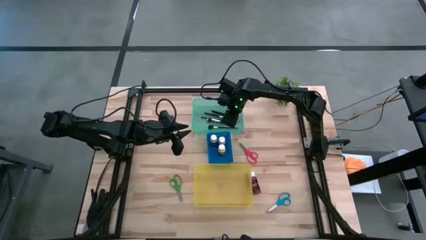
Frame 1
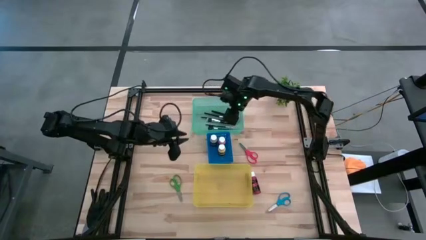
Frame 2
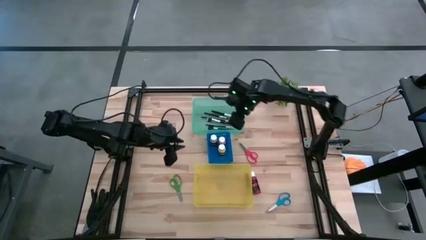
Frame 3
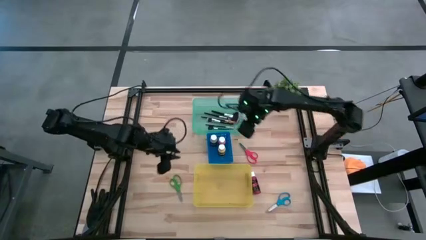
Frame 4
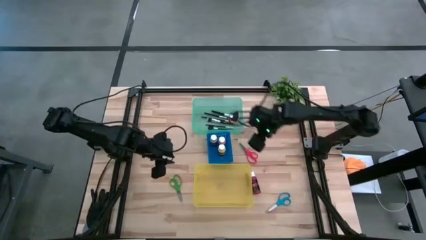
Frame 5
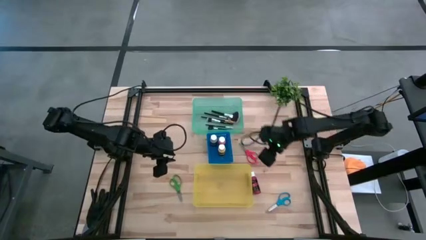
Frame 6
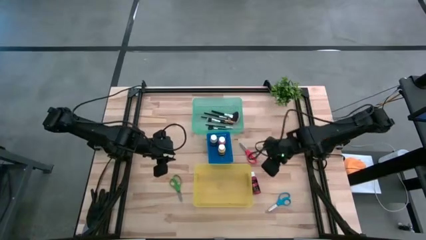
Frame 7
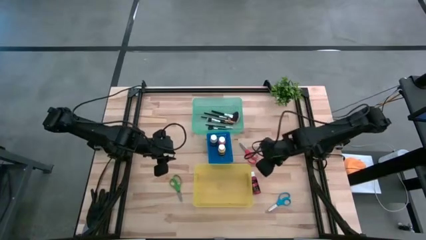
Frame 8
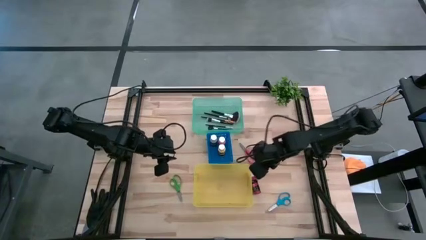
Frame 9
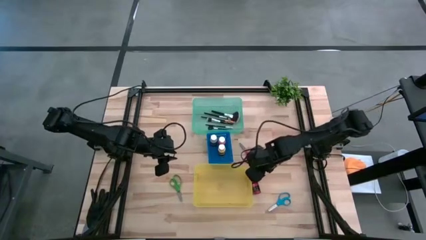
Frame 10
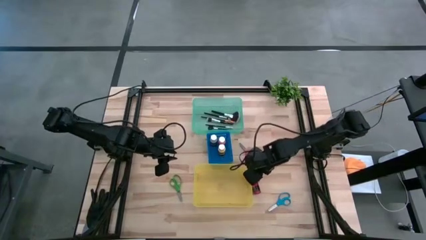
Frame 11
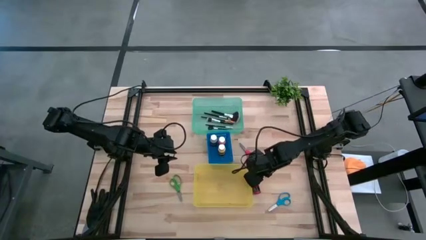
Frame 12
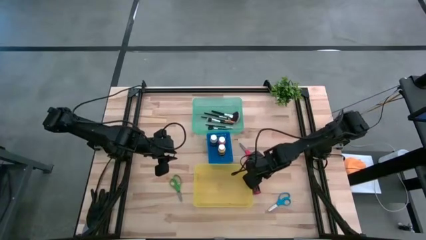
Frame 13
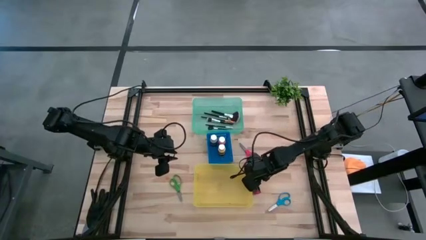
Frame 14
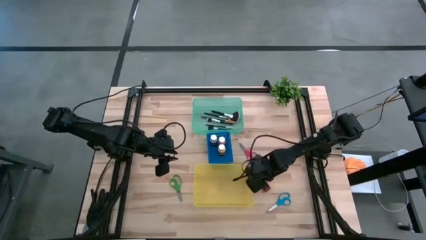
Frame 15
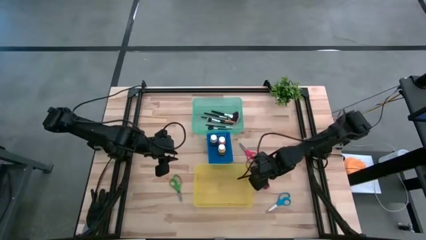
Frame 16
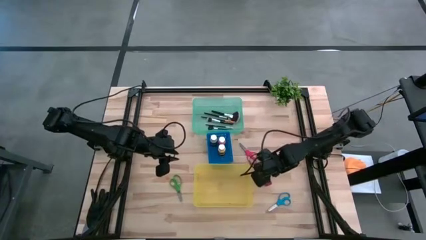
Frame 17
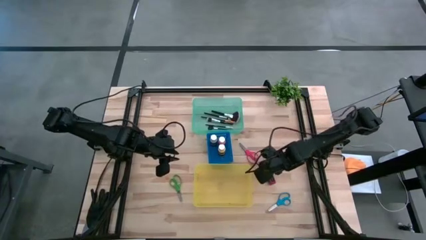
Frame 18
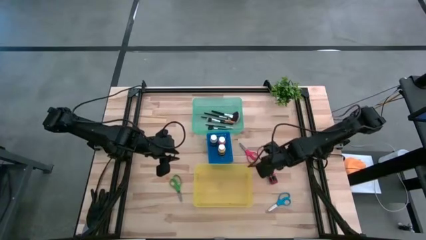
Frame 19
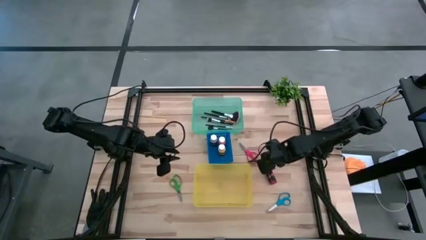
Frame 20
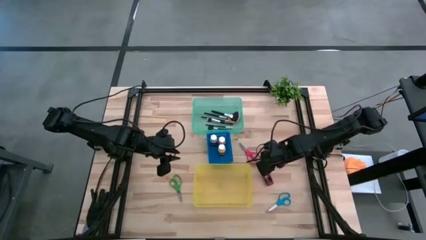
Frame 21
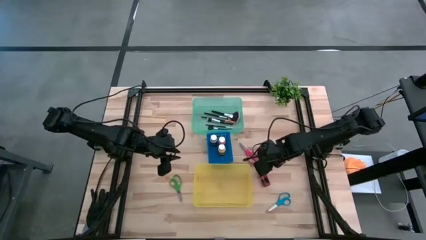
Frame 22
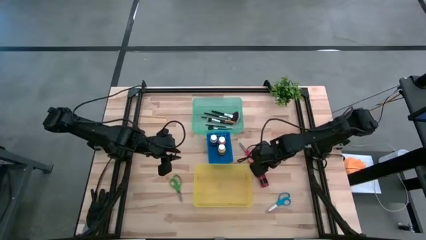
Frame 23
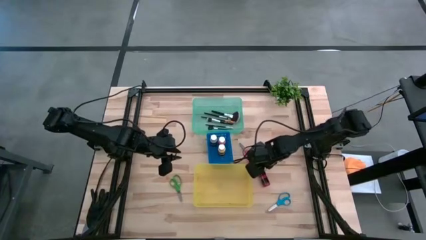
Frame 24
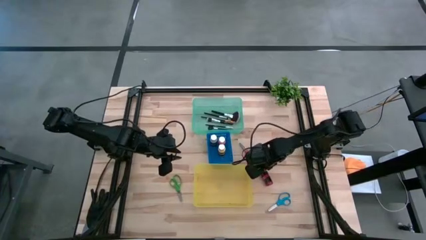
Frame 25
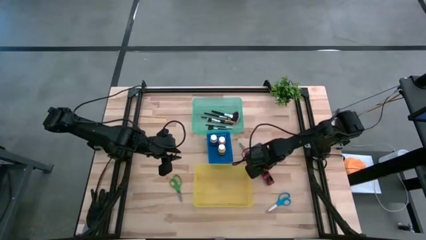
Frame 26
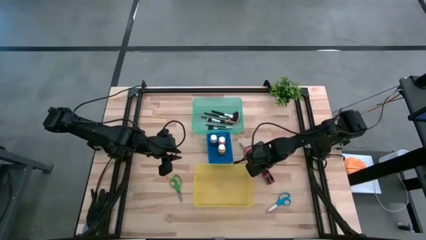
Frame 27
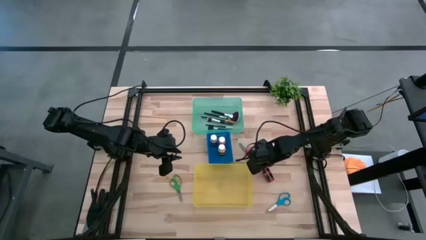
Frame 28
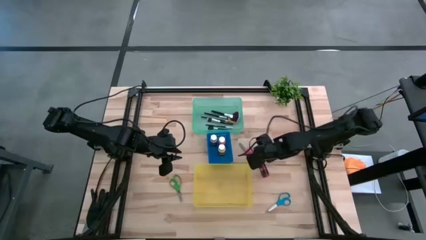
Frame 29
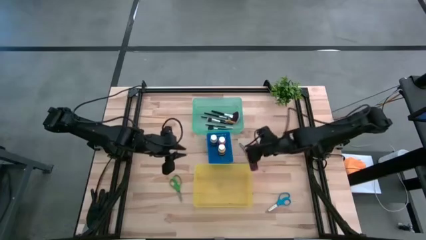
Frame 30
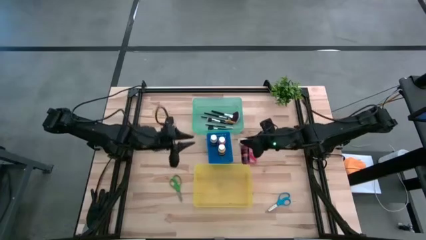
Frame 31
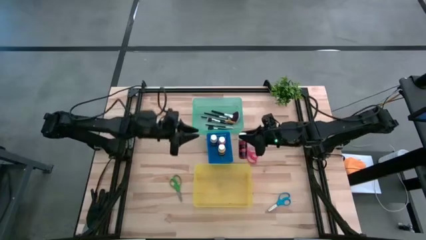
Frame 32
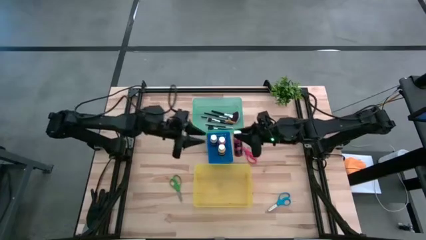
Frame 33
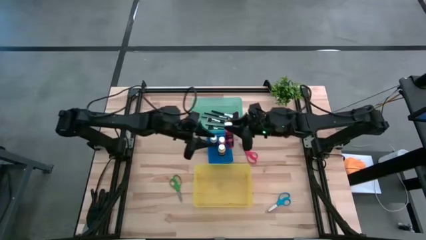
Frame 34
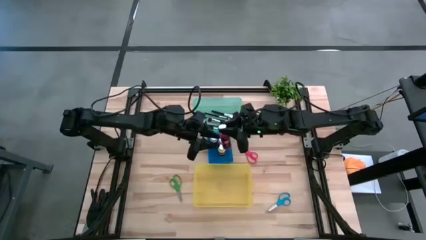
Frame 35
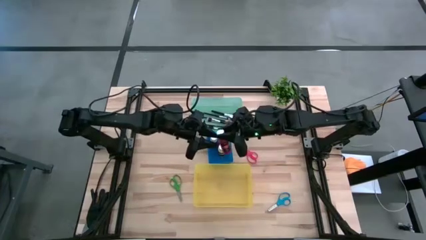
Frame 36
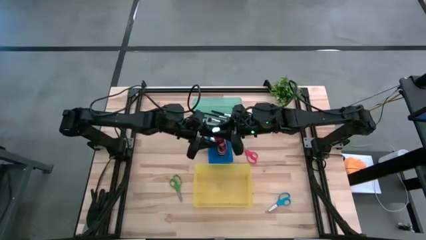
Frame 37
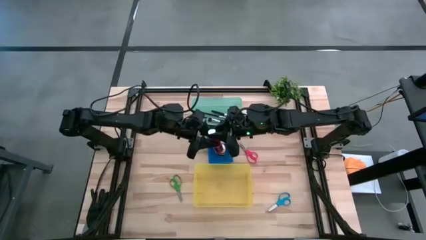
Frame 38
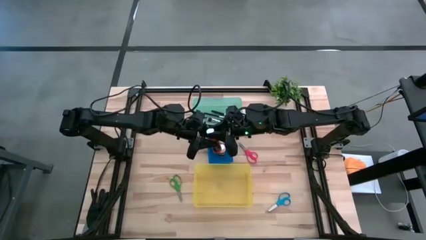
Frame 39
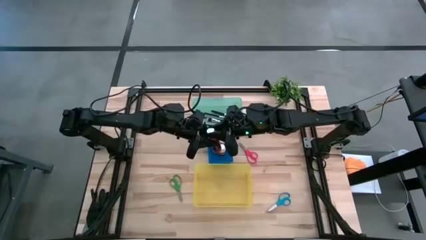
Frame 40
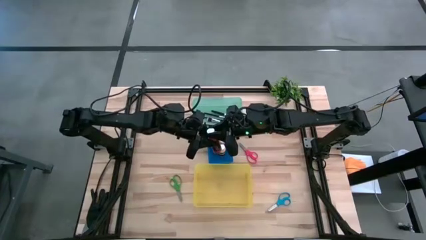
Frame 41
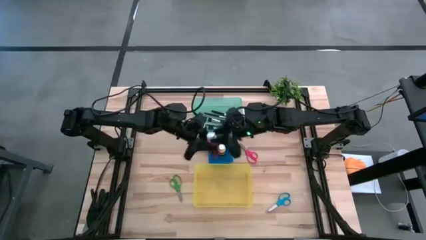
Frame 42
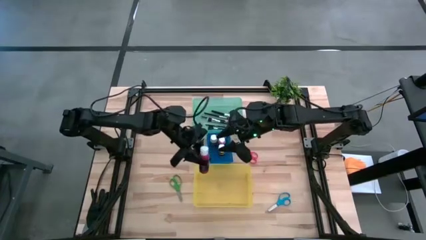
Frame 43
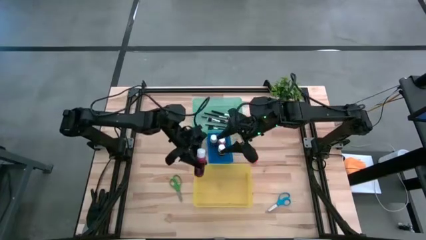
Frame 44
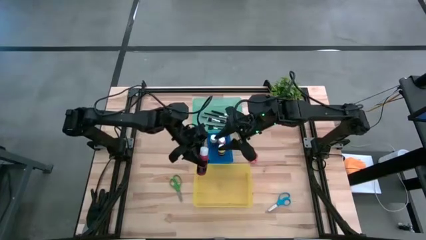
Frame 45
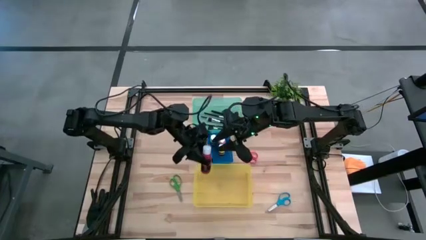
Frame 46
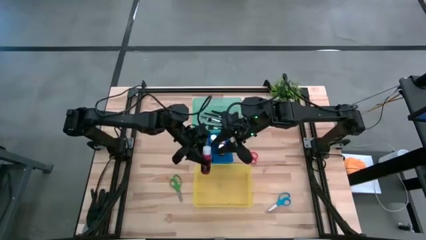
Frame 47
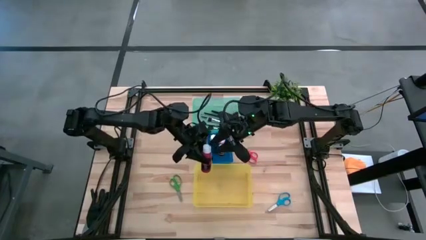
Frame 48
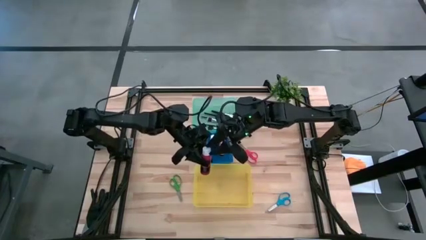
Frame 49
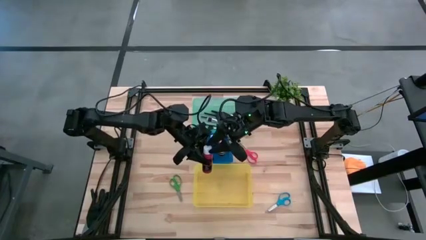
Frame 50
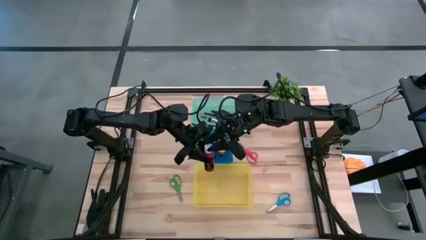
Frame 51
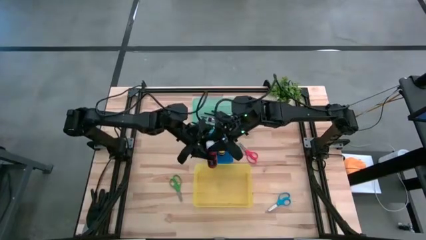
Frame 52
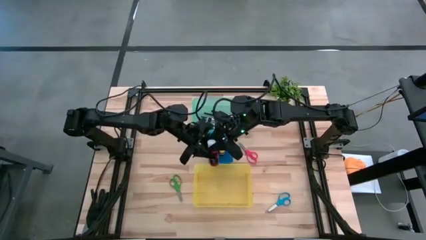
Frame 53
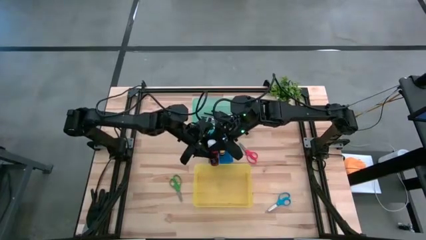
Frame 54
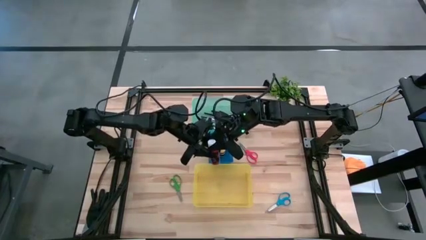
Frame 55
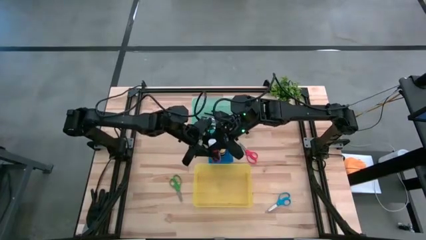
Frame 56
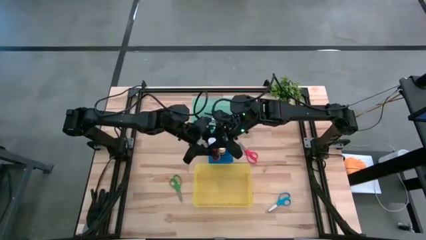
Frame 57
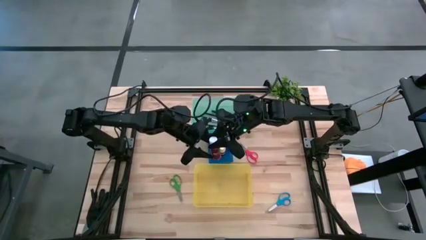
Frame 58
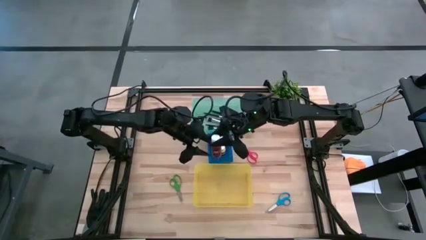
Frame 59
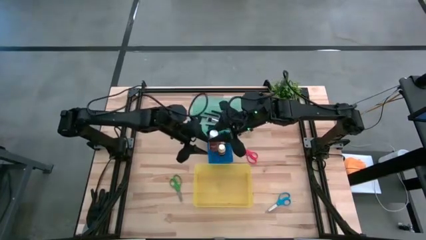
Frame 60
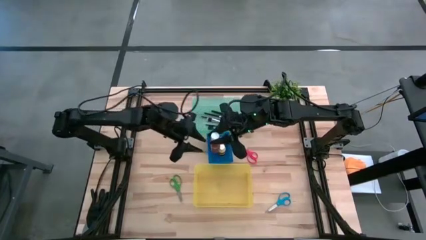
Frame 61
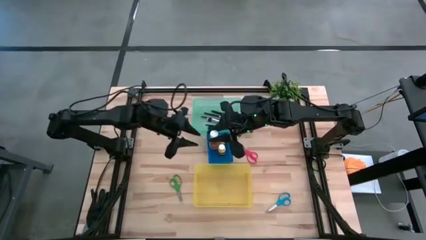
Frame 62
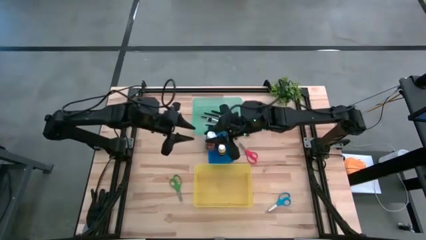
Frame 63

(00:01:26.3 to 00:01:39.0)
Task: Pick & Place Paint Supplies
Put the red paint bottle into the blue bin
